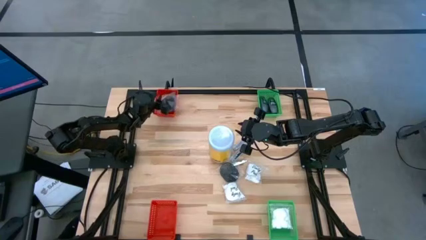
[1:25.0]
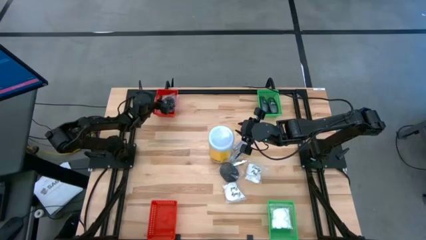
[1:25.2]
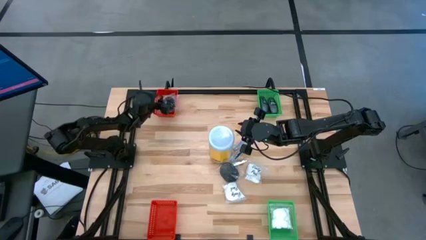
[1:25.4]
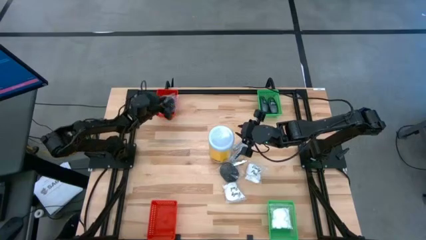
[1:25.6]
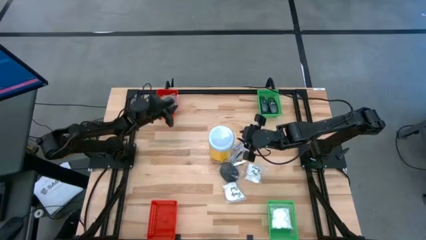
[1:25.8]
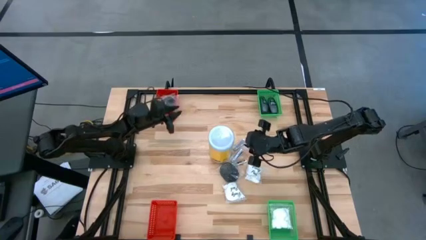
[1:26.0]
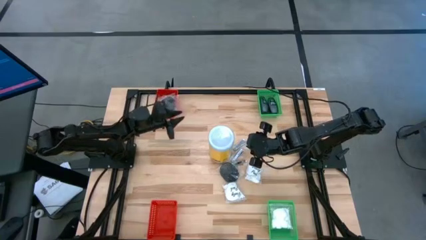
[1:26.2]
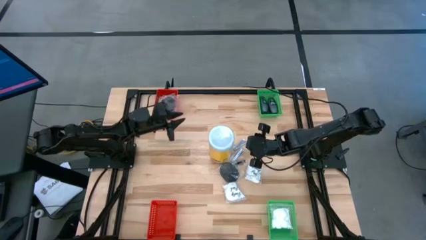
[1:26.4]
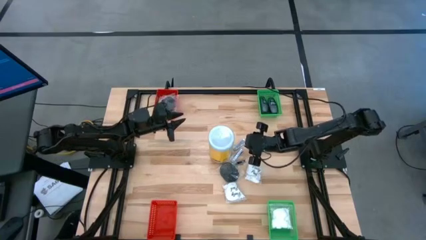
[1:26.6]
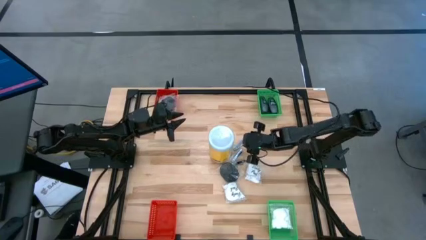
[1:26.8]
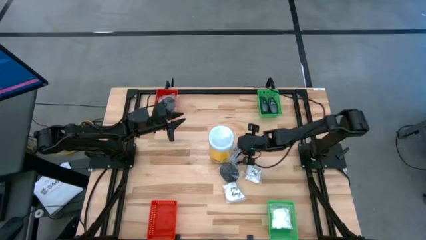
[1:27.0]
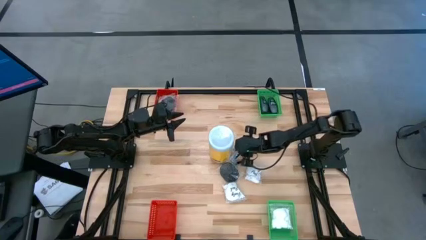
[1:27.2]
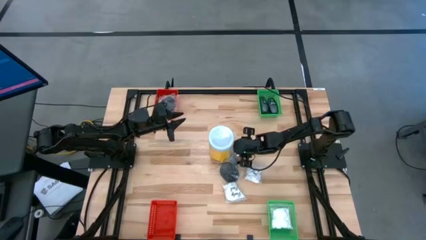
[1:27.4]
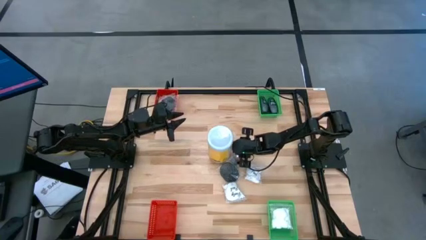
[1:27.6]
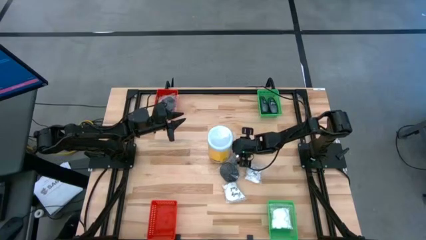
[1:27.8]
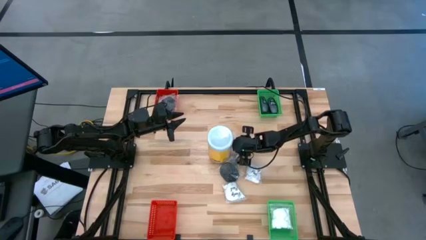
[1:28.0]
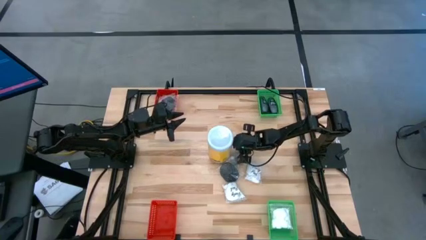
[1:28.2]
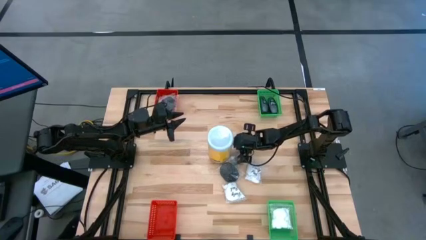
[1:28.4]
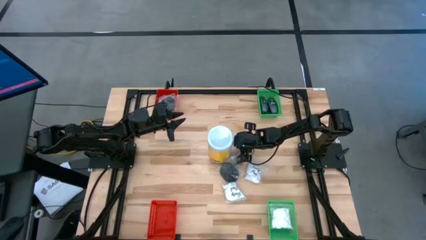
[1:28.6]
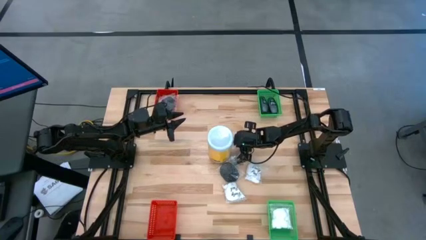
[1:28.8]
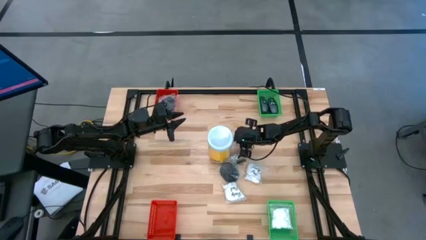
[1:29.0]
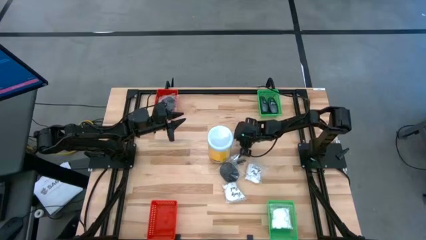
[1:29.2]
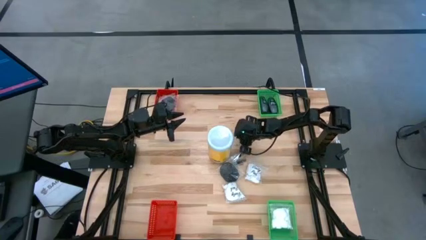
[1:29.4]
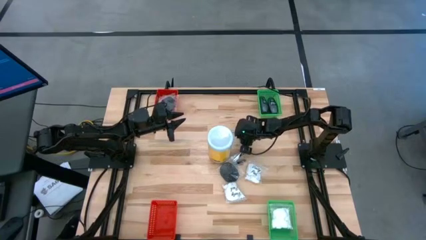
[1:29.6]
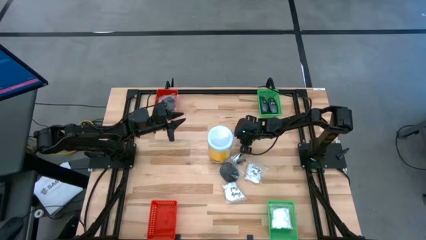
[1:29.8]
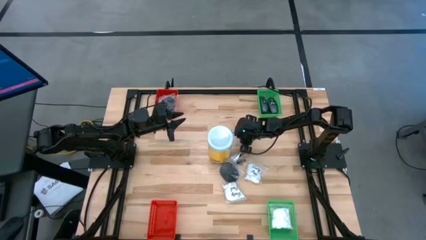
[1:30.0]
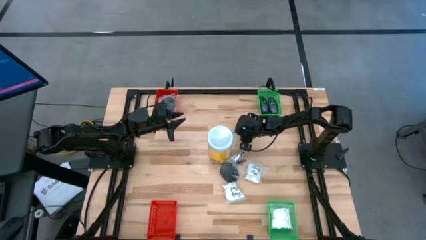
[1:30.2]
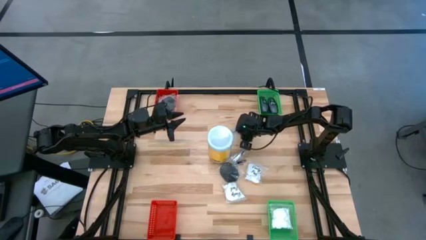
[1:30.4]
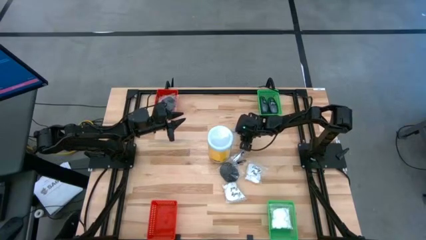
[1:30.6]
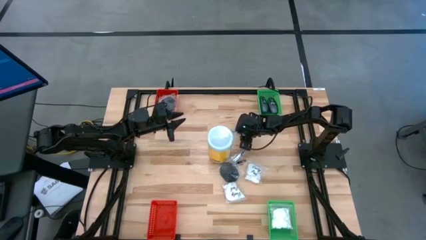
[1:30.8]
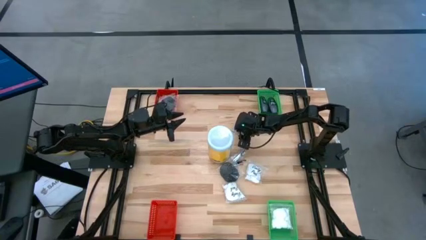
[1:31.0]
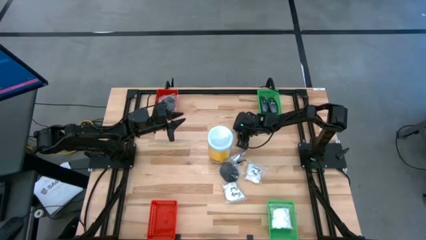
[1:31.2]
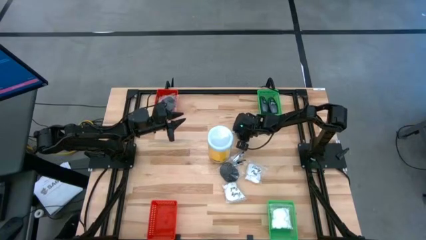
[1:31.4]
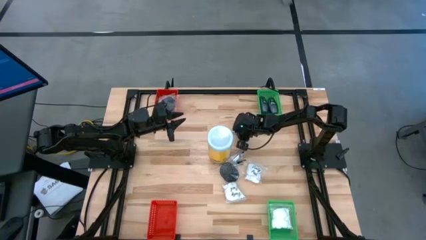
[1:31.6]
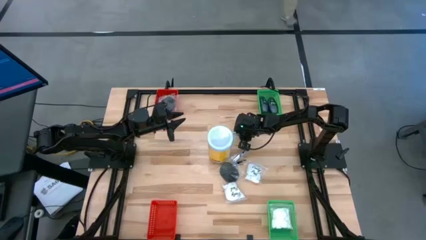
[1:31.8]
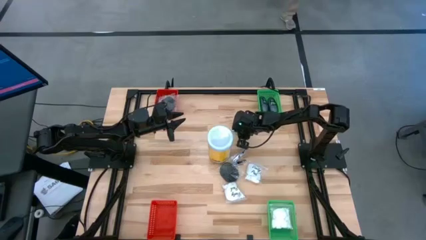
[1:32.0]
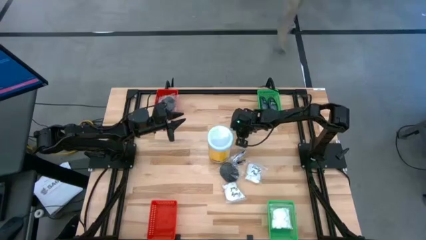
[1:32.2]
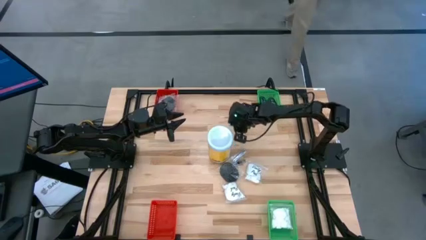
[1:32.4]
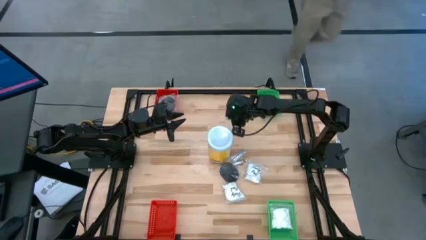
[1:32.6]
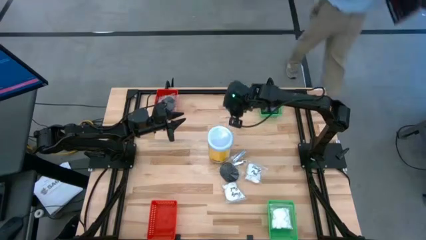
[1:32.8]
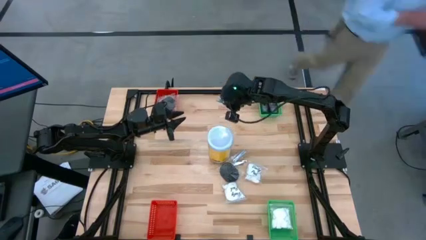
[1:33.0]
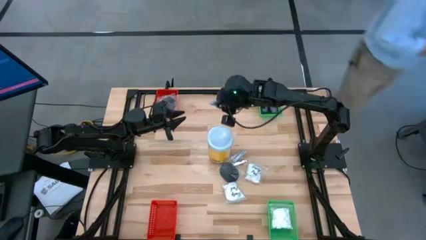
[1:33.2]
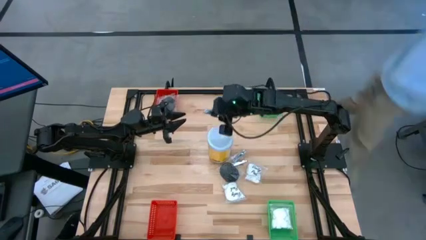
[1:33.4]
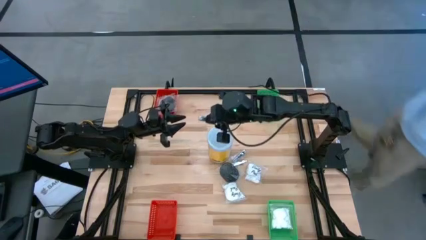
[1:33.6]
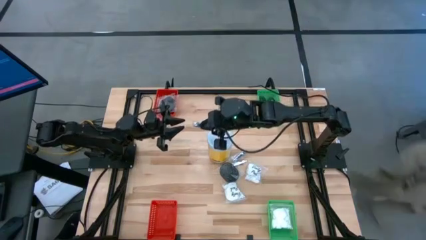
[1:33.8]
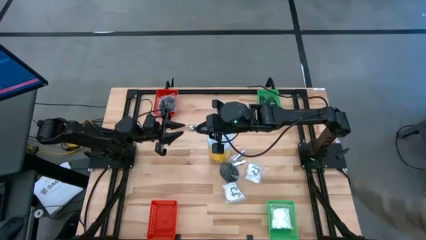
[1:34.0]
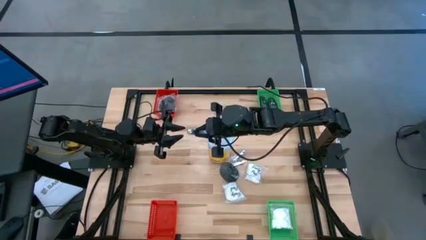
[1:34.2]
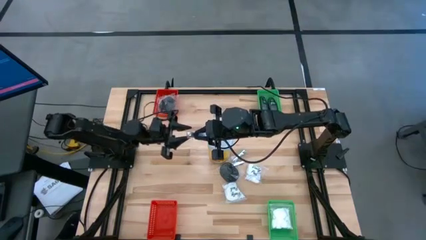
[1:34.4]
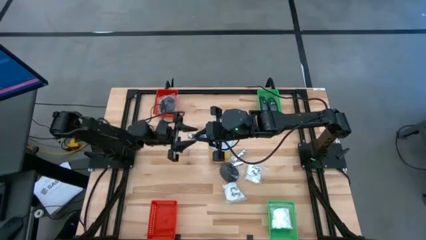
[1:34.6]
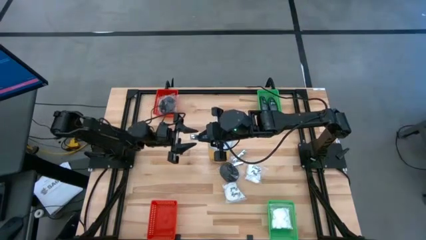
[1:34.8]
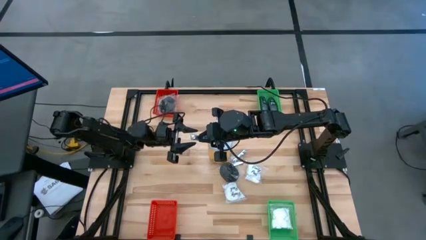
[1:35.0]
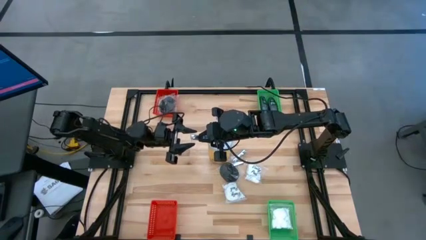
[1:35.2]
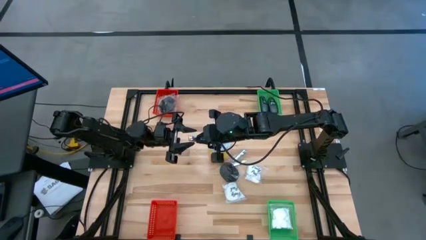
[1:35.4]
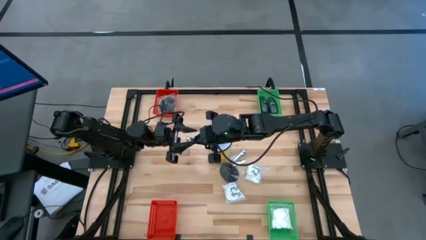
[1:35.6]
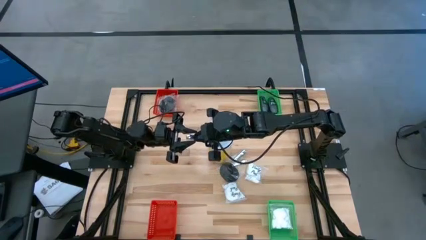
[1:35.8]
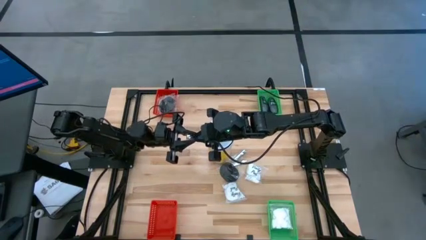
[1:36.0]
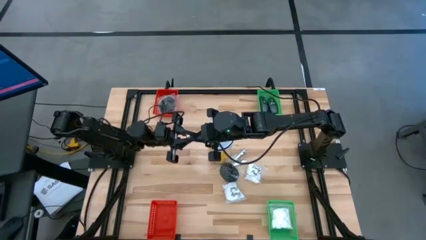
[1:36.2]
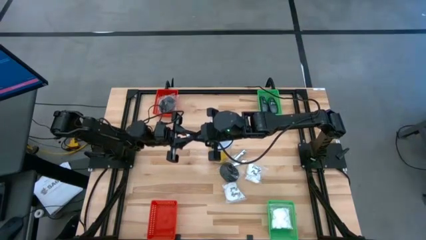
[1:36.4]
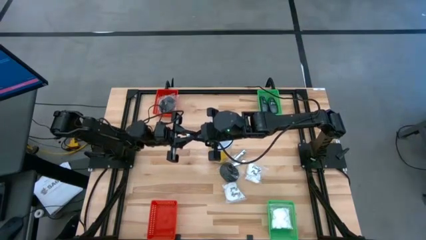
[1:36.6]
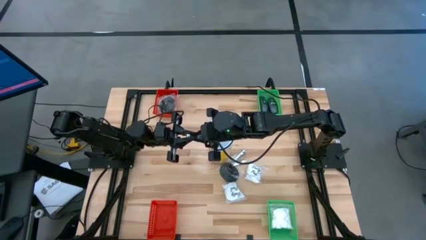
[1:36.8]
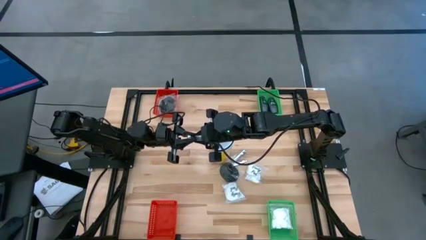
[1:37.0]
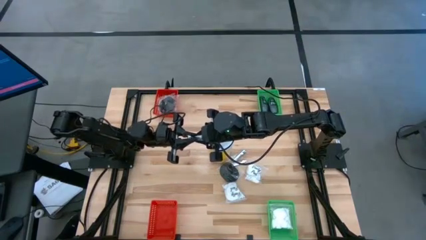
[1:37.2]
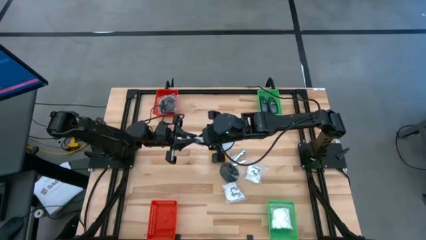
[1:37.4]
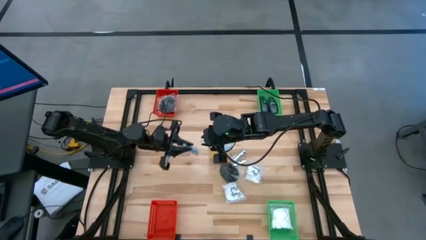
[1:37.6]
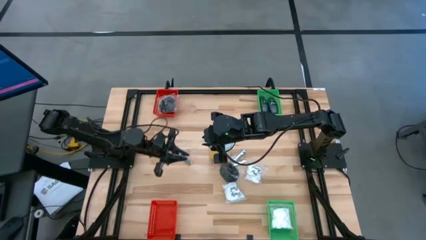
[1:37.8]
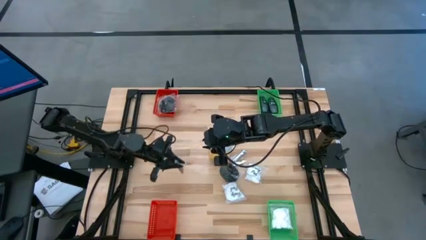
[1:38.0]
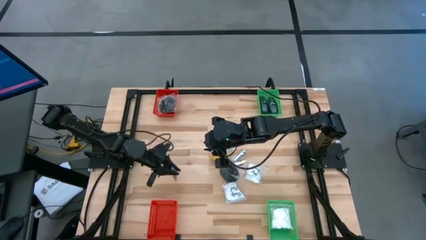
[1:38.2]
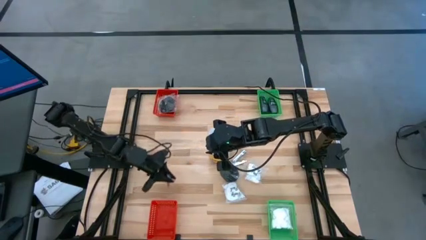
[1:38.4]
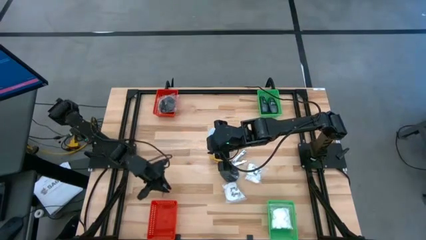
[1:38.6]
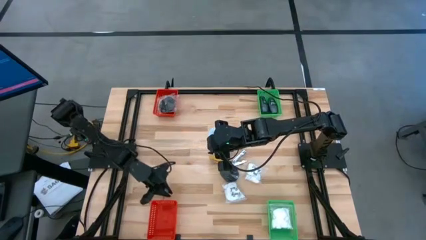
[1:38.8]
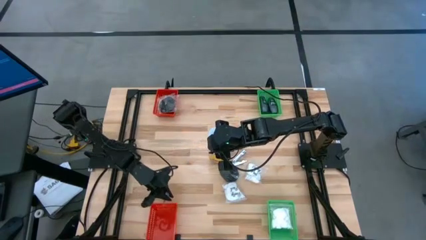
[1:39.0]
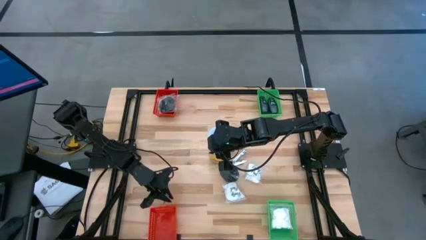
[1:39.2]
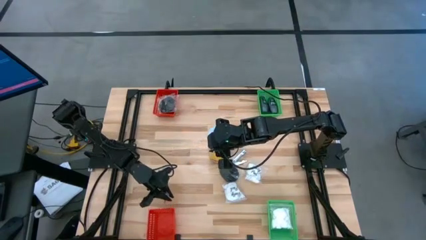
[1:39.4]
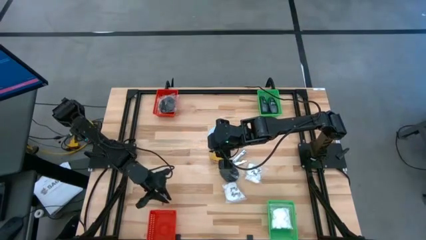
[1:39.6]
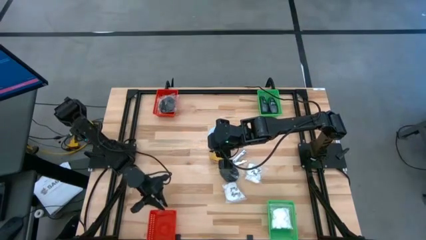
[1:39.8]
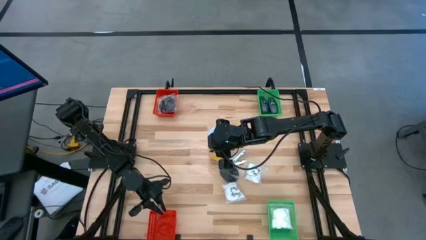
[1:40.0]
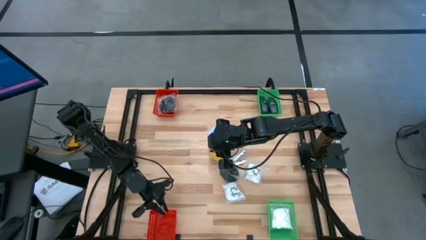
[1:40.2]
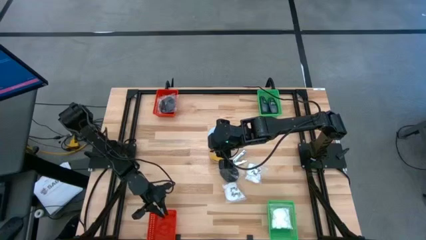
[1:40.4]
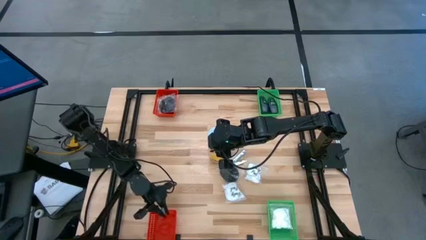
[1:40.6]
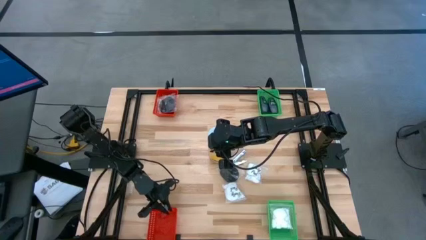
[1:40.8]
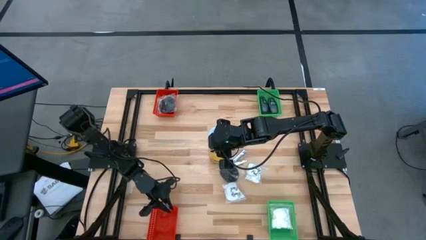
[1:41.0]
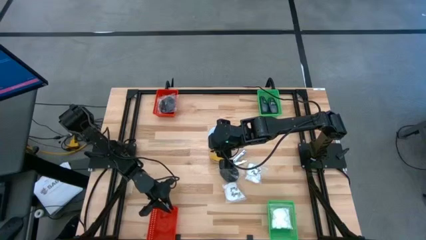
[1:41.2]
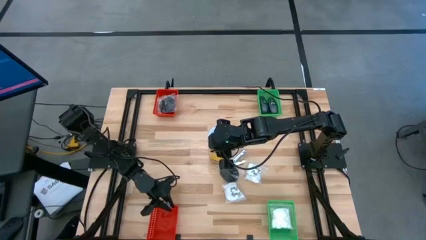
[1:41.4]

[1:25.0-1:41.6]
Task: Pick & Place Travel size toiletries
Put the nail cutter into the bottom orange bin
